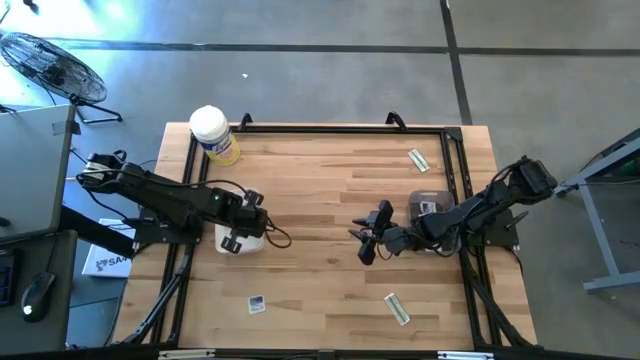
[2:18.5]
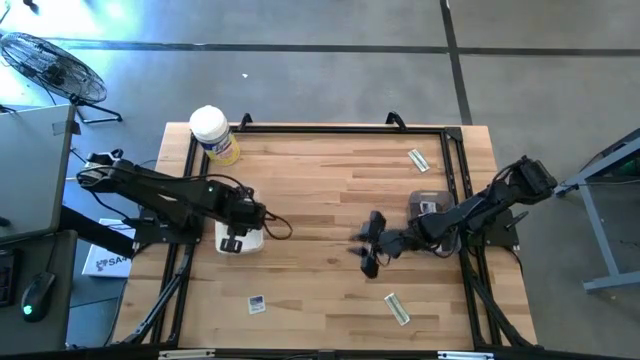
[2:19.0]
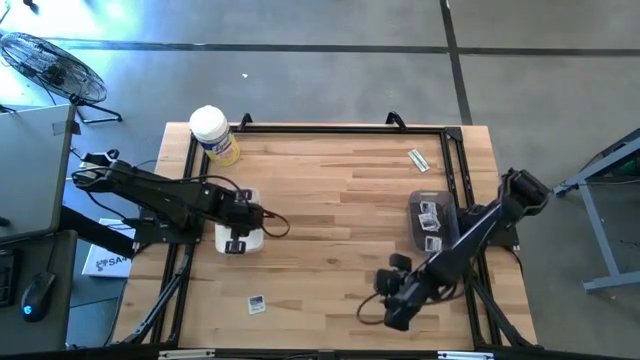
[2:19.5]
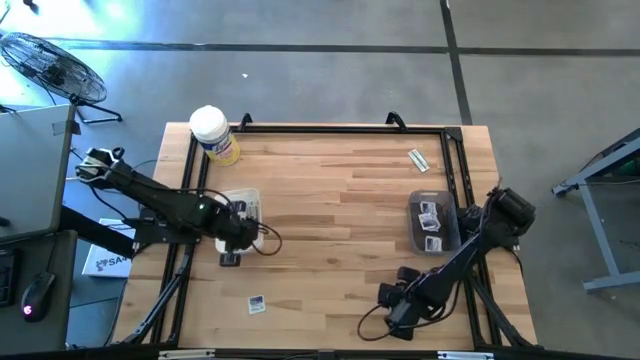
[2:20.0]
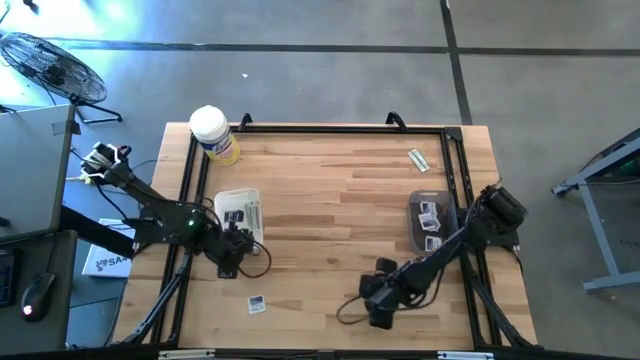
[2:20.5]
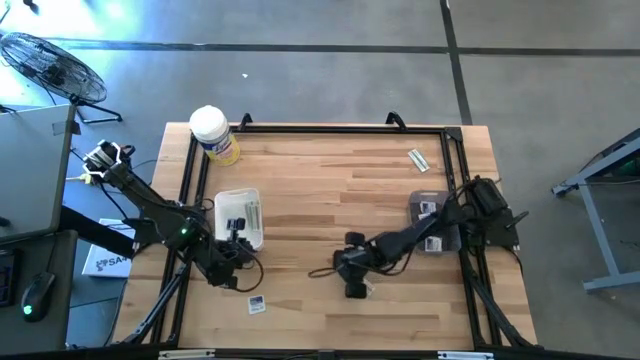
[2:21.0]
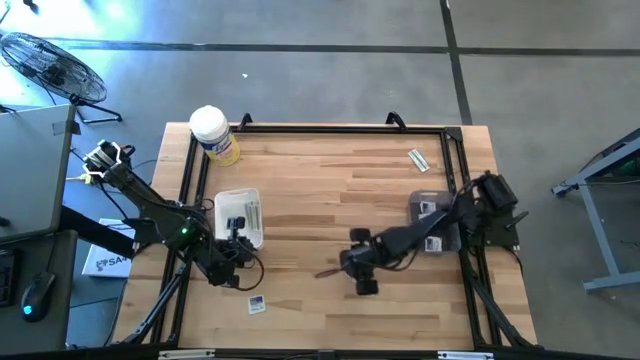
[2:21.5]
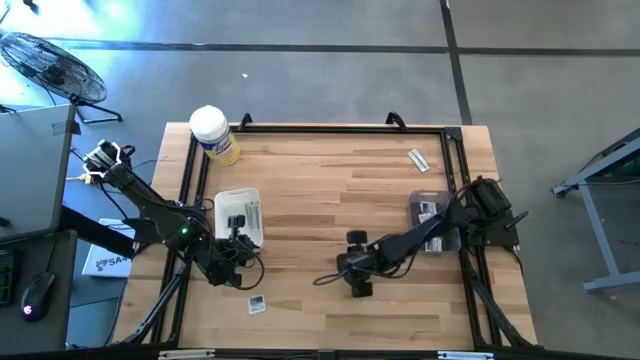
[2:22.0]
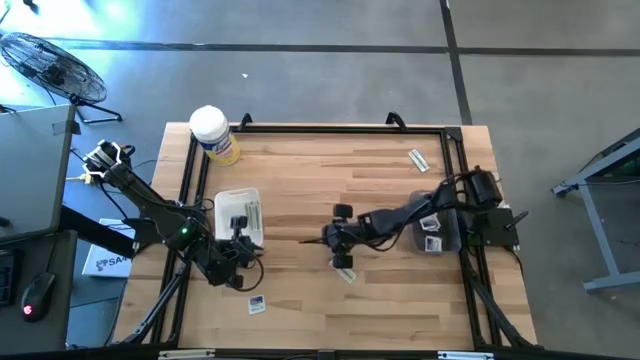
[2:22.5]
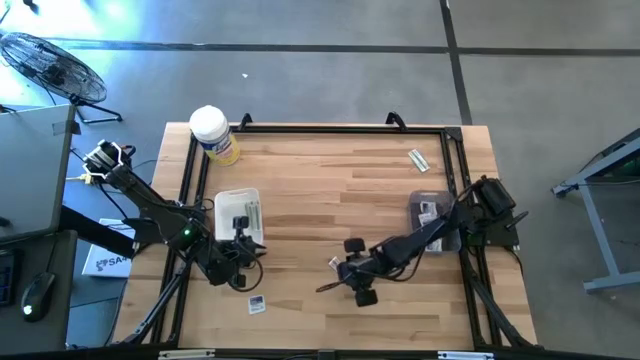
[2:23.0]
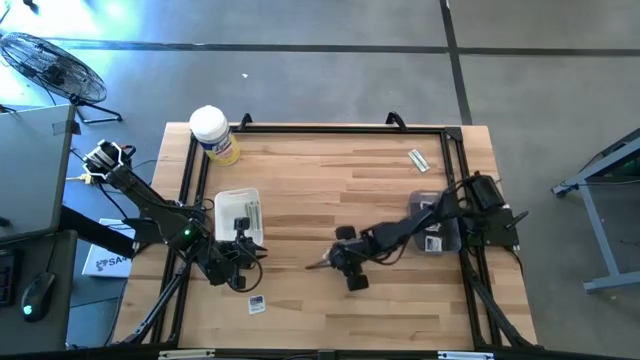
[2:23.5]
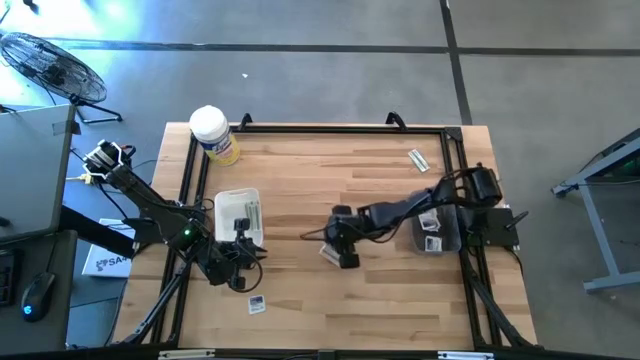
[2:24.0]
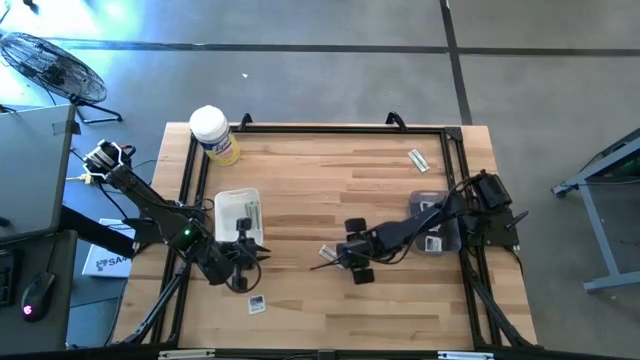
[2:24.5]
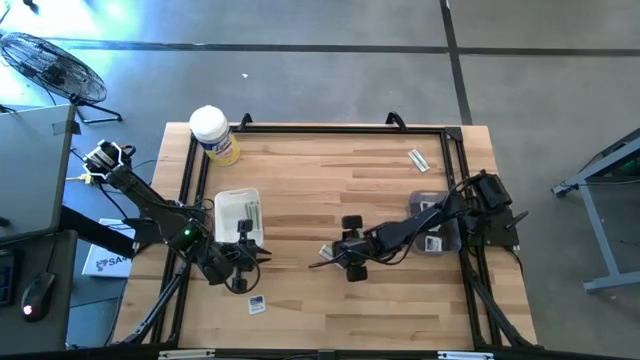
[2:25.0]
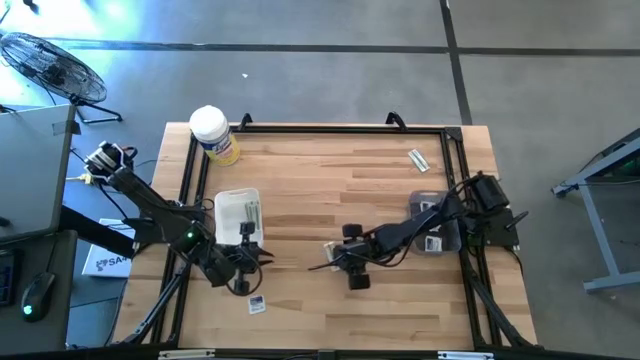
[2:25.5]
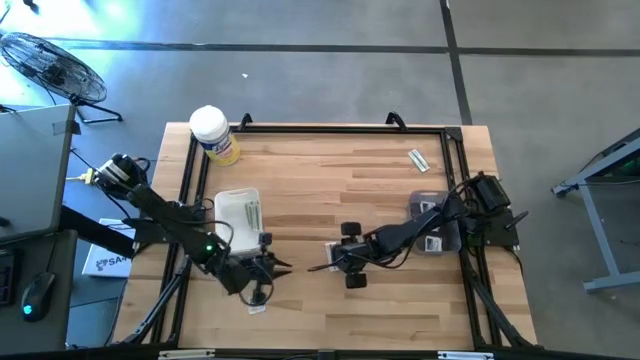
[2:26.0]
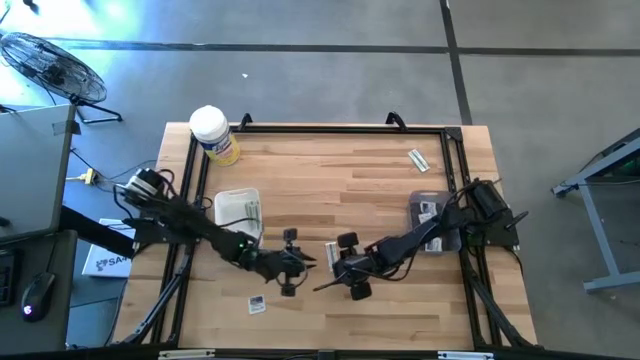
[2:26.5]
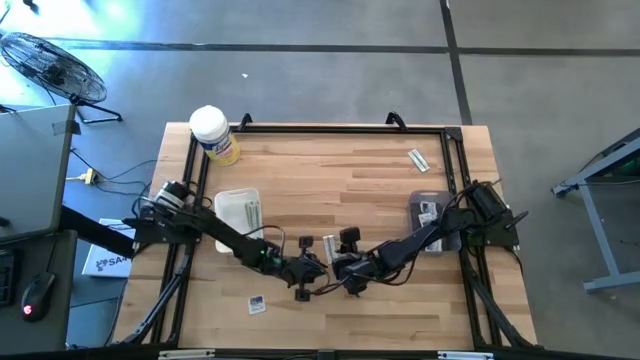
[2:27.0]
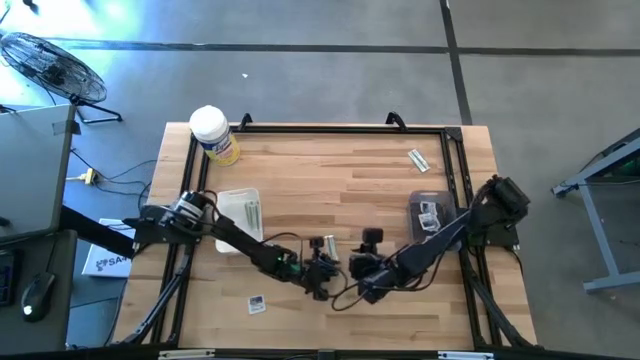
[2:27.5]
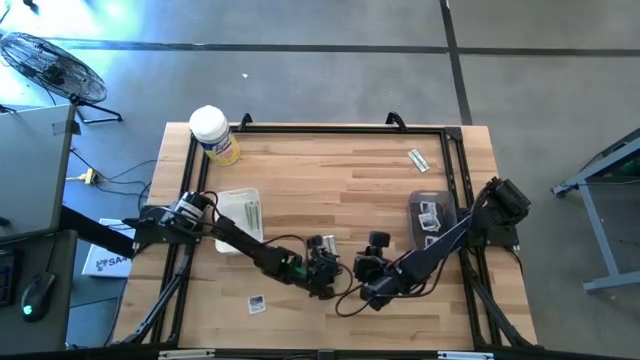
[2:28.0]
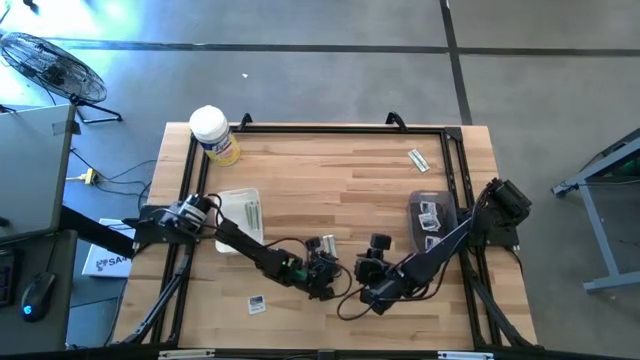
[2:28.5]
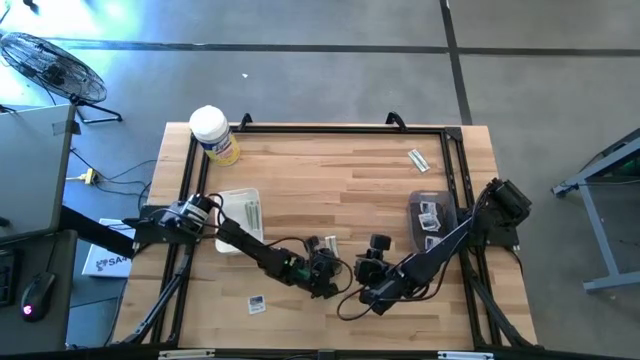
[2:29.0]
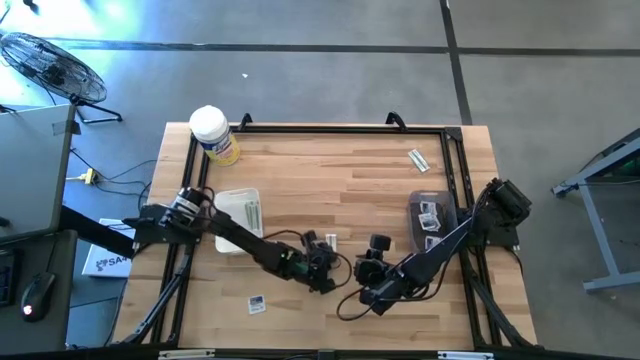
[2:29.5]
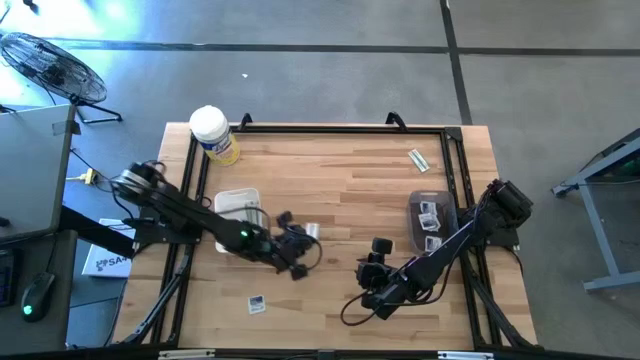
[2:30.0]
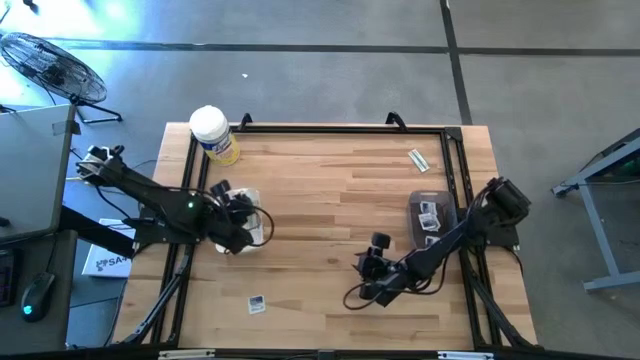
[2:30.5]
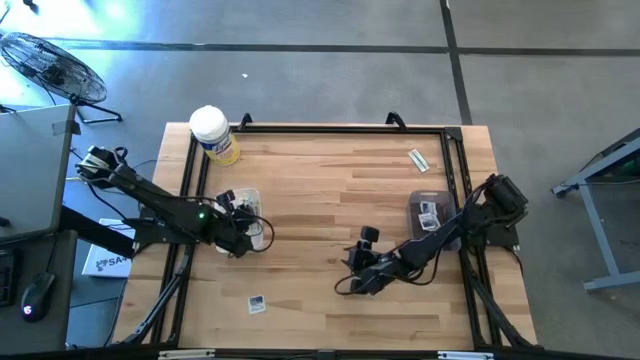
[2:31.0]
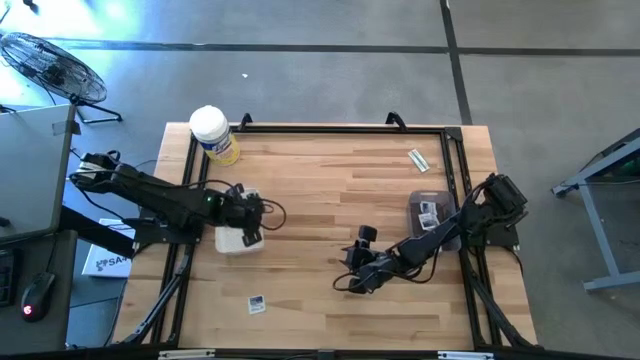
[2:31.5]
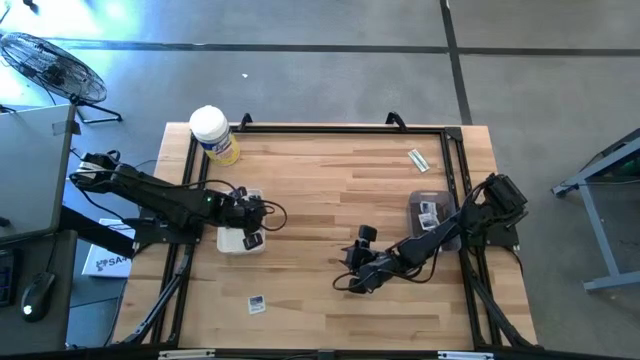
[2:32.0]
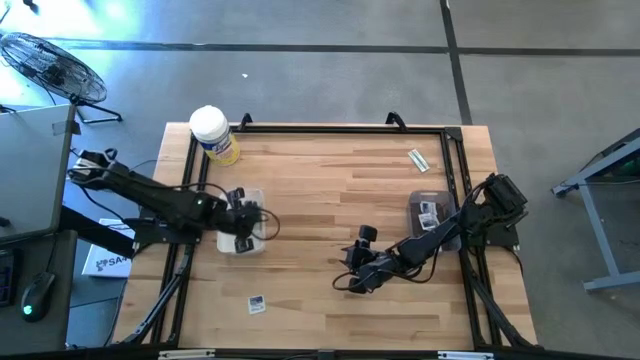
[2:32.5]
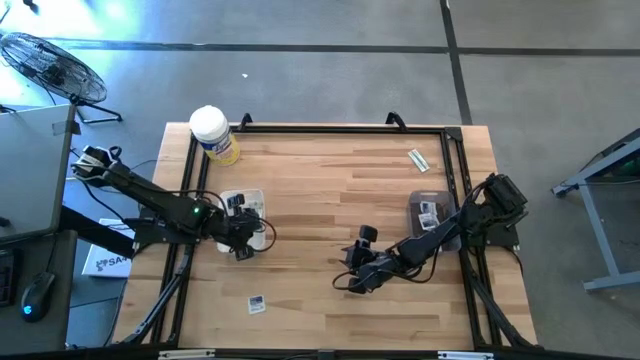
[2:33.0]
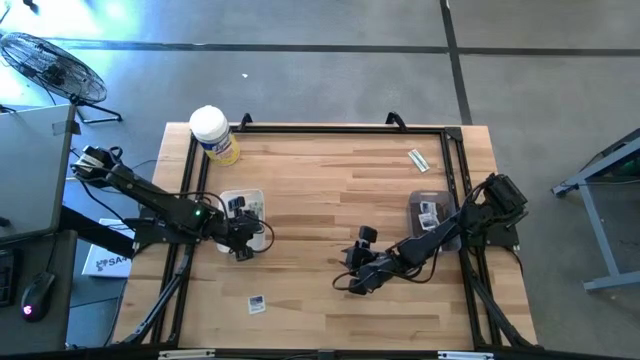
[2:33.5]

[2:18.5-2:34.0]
Task: Pick & Place First Aid Supplies
Put the green bandage into the white bin

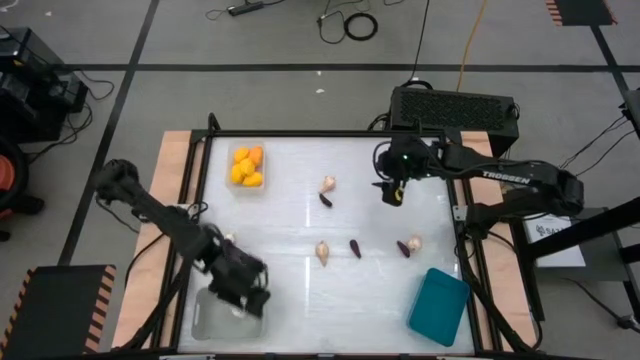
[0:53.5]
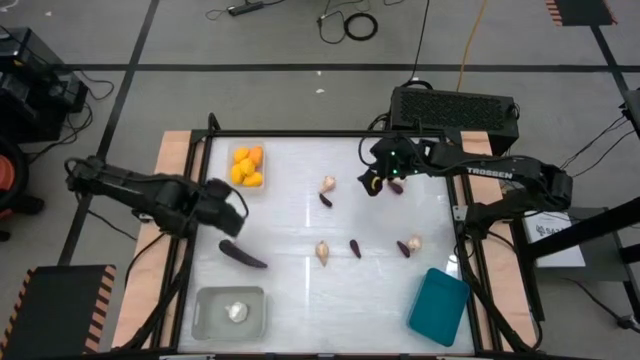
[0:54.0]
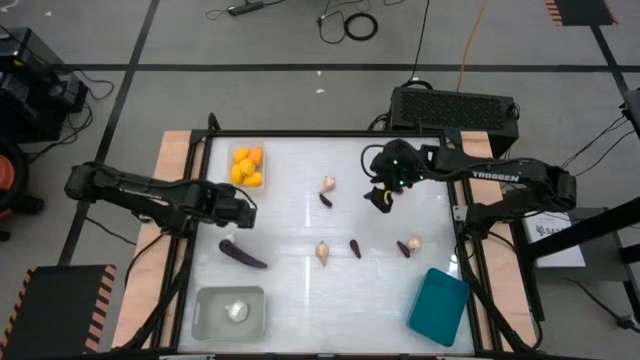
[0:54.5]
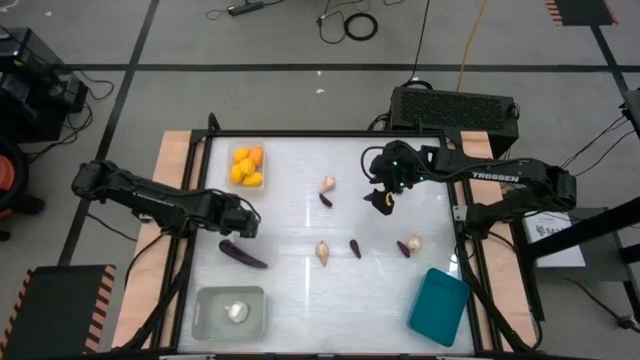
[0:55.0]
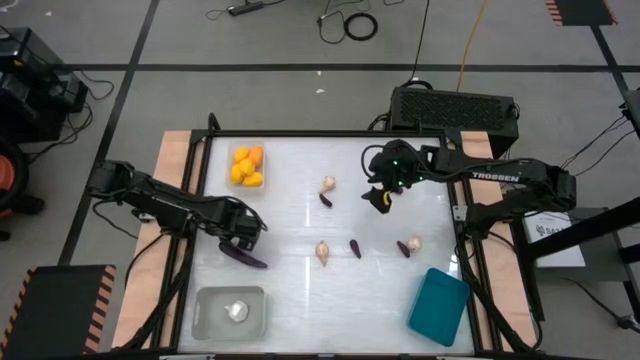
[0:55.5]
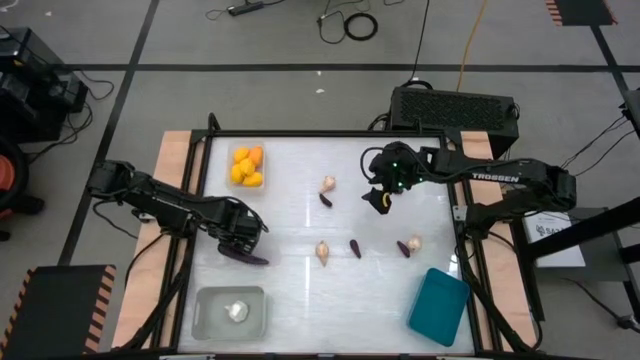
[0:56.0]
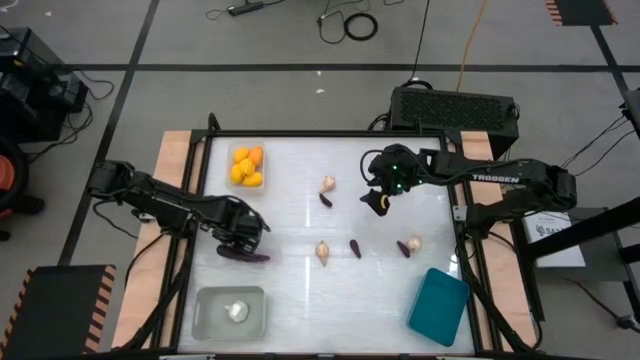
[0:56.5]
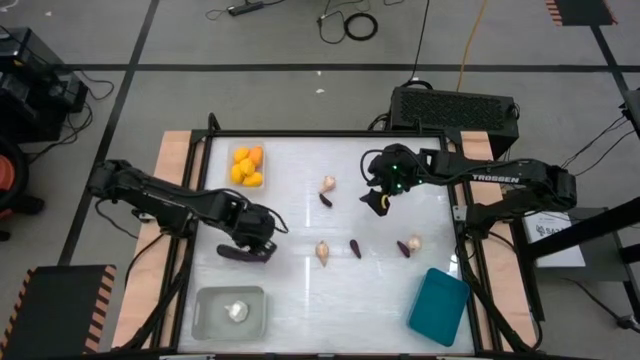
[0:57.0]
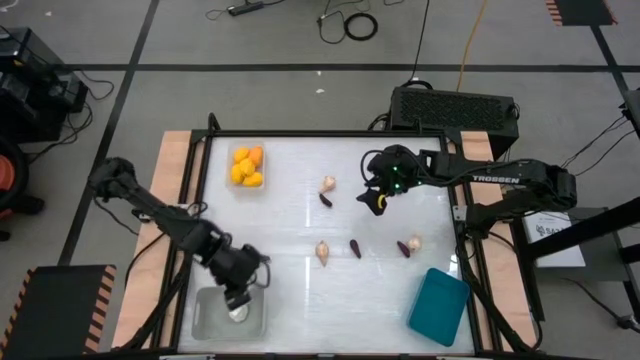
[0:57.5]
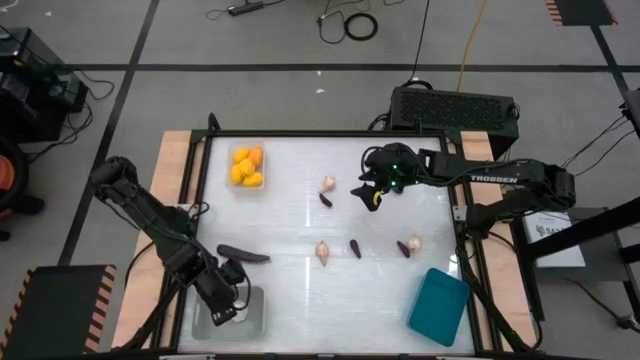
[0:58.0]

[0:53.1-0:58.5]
Task: Sort produce into baskets
Put the white garlic into the gray bin
